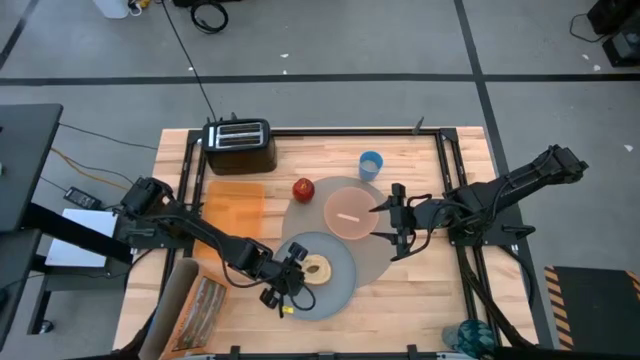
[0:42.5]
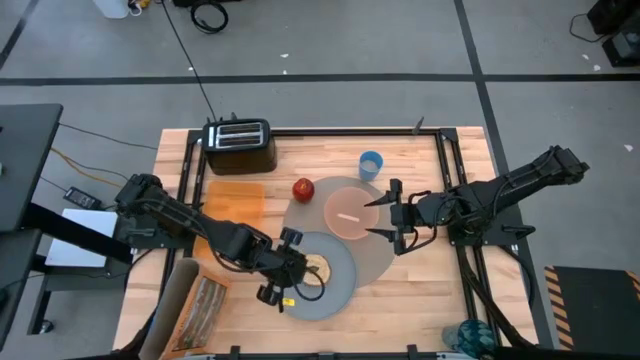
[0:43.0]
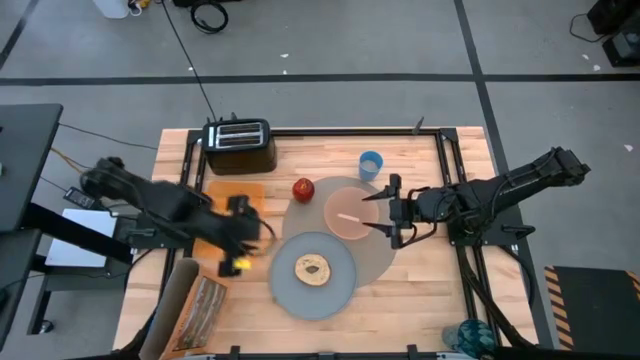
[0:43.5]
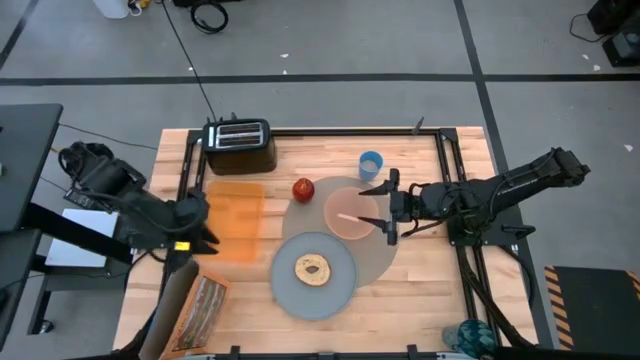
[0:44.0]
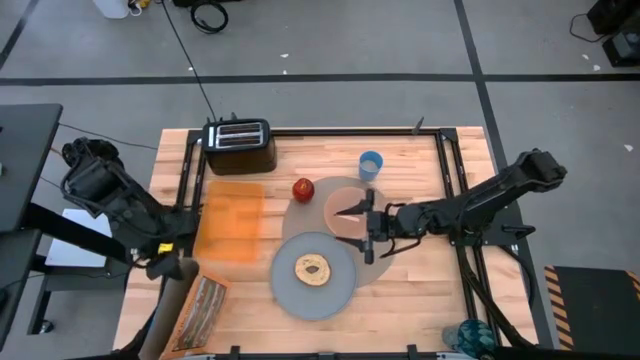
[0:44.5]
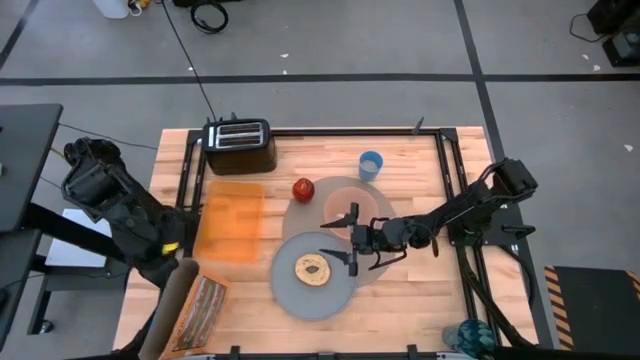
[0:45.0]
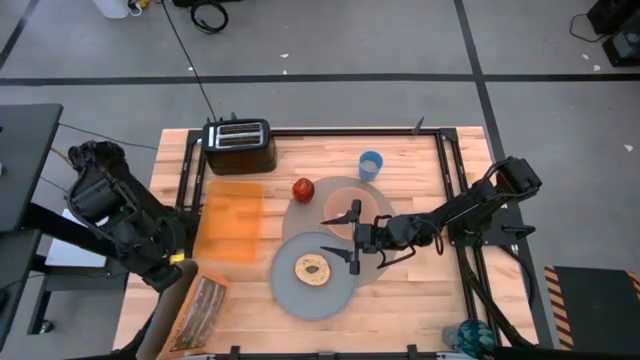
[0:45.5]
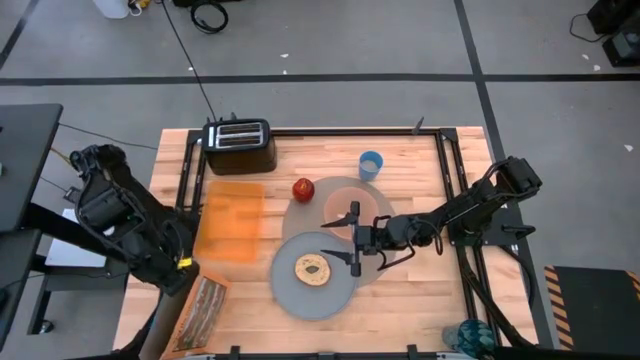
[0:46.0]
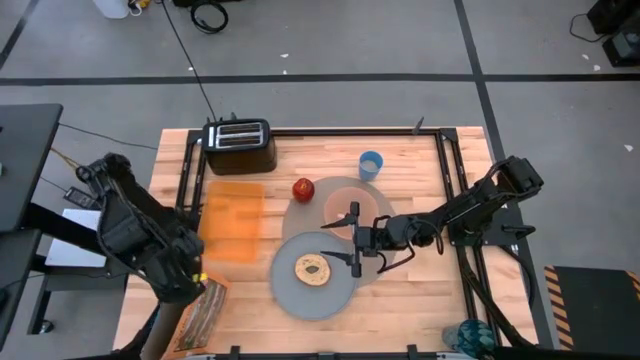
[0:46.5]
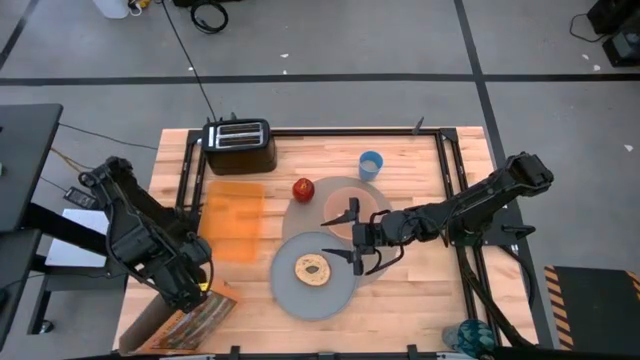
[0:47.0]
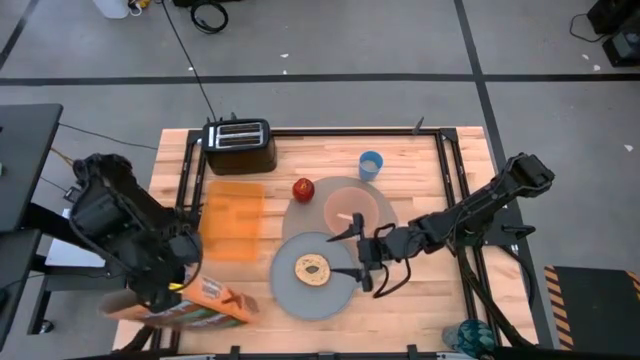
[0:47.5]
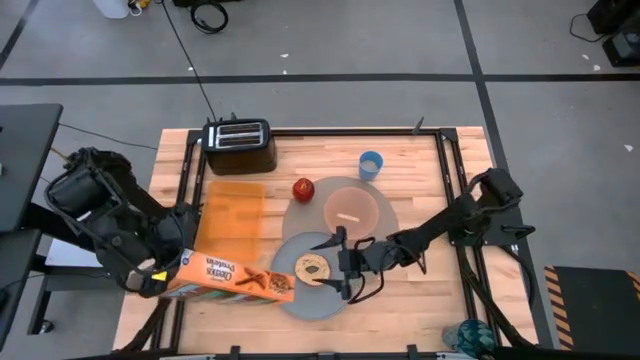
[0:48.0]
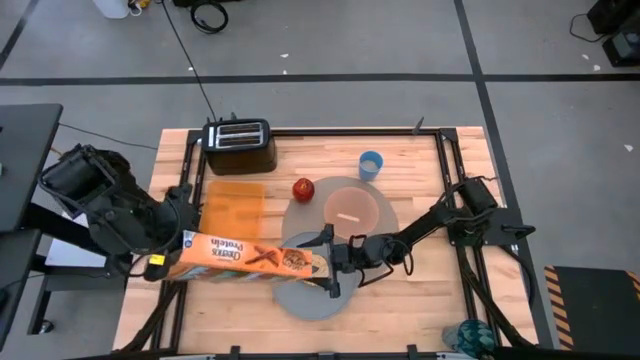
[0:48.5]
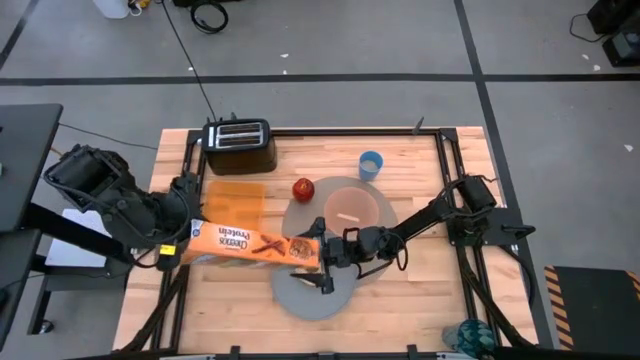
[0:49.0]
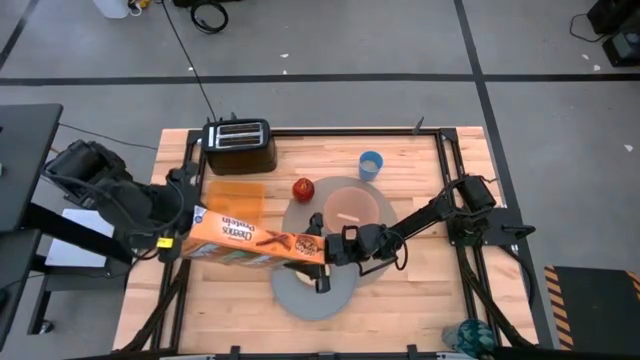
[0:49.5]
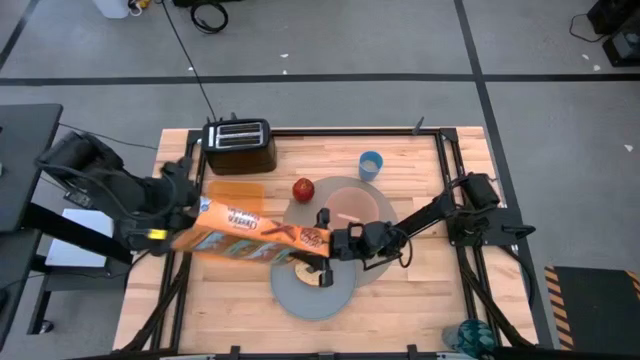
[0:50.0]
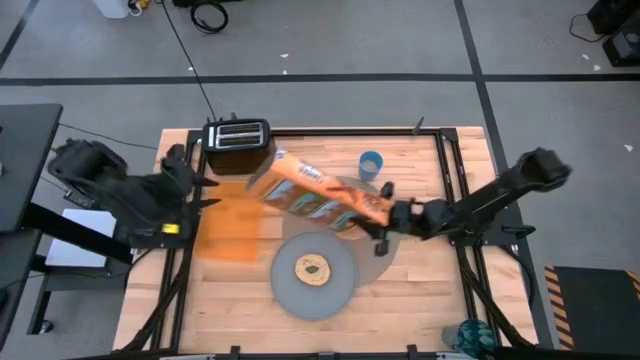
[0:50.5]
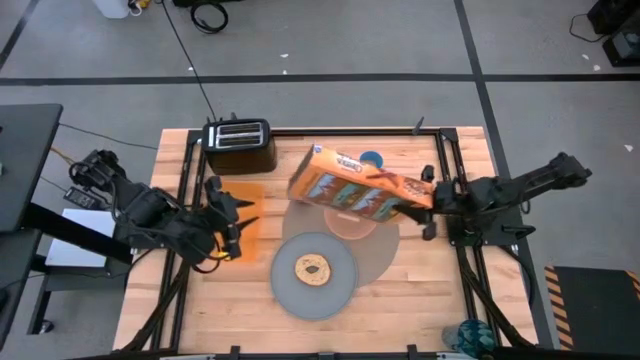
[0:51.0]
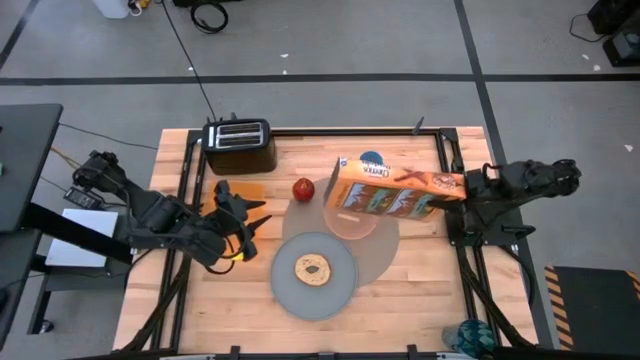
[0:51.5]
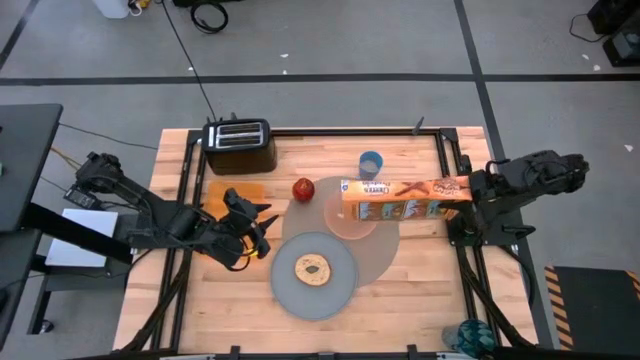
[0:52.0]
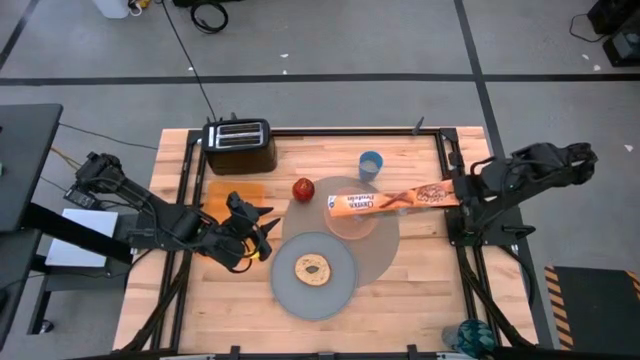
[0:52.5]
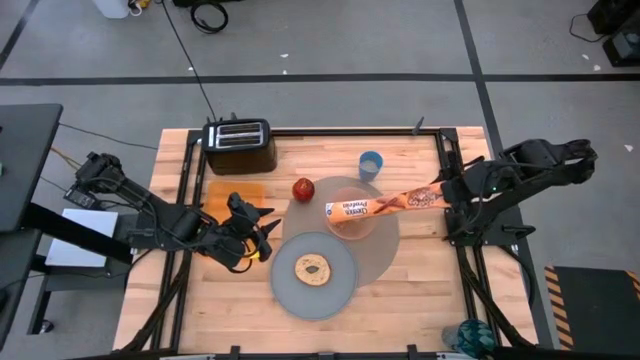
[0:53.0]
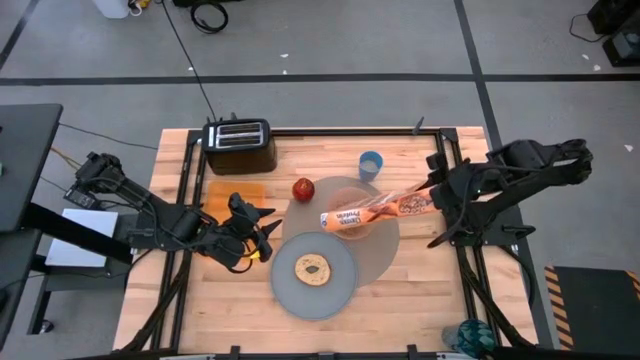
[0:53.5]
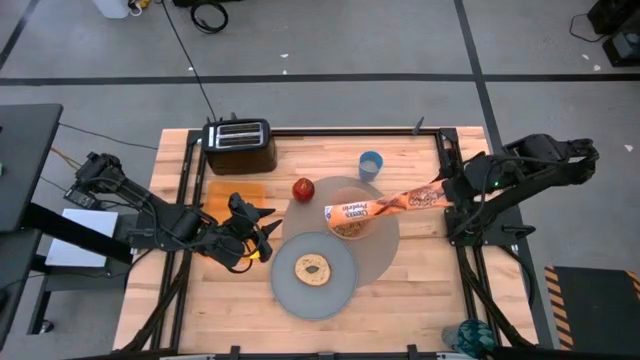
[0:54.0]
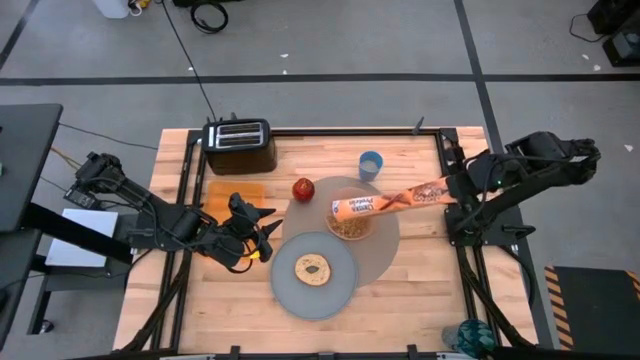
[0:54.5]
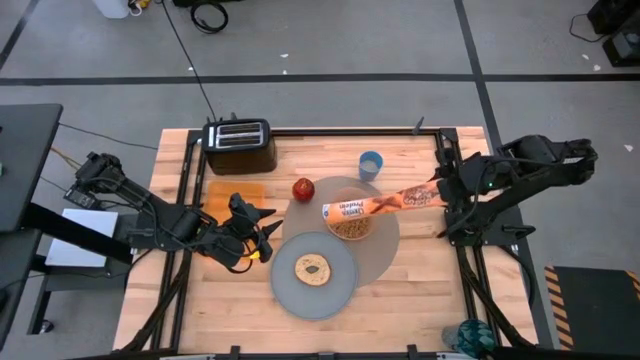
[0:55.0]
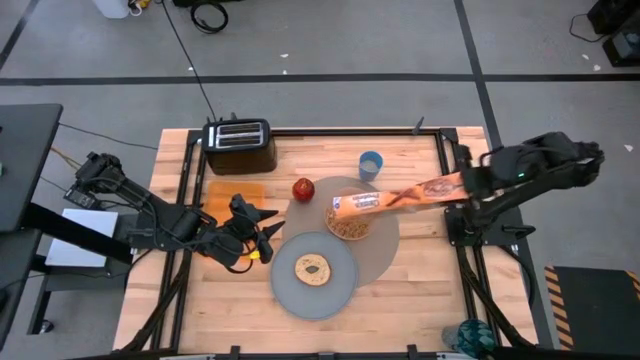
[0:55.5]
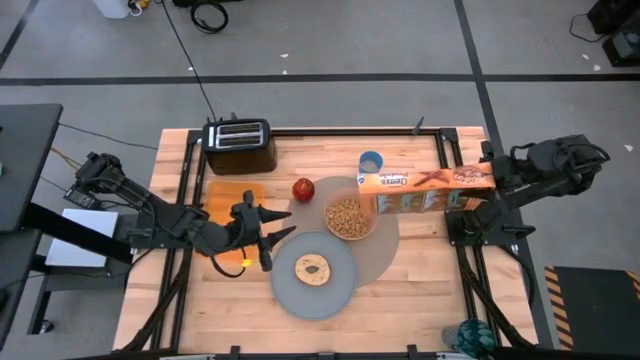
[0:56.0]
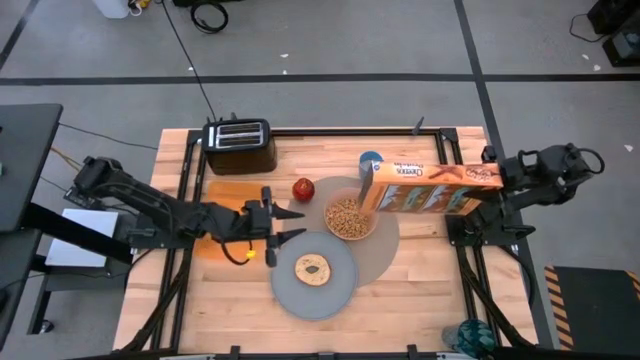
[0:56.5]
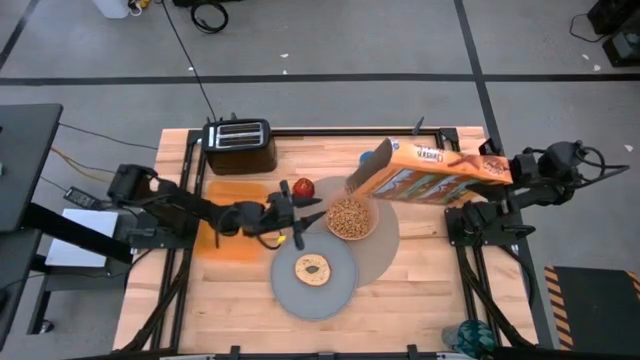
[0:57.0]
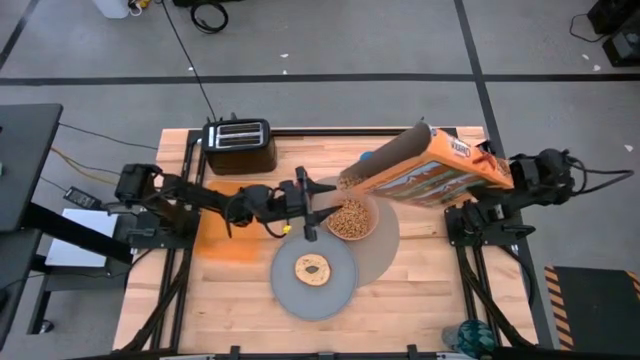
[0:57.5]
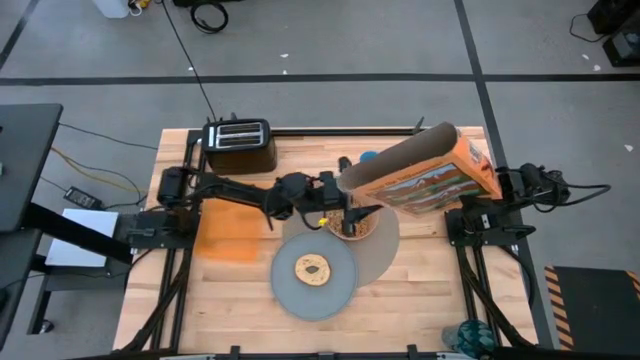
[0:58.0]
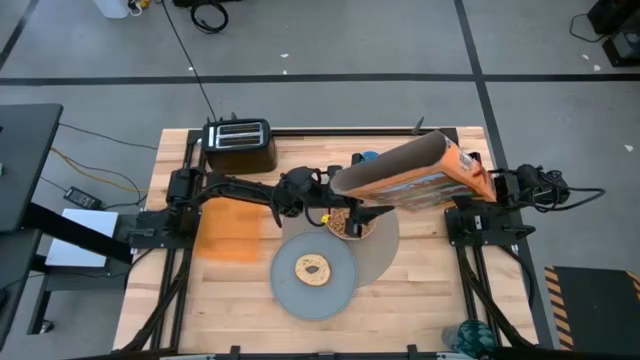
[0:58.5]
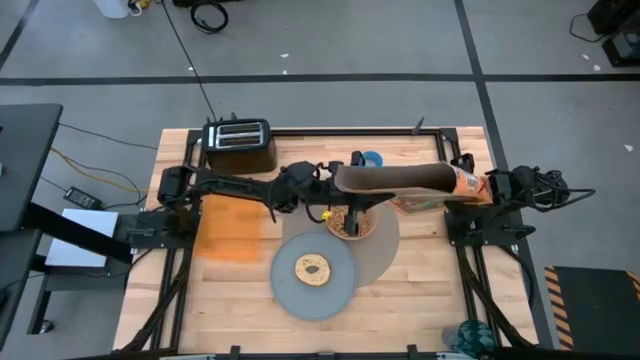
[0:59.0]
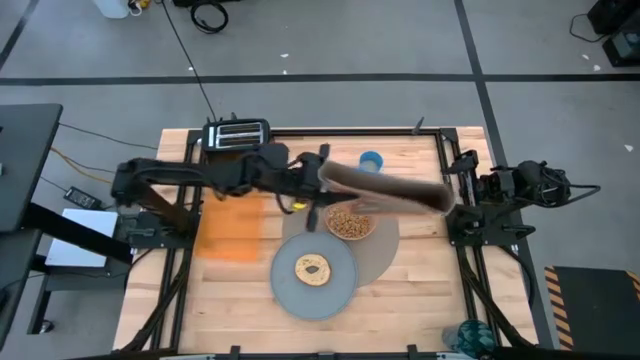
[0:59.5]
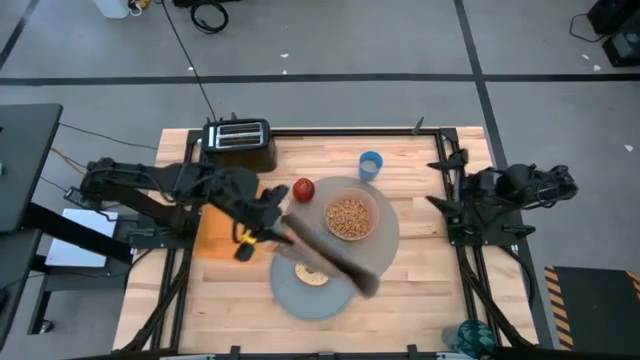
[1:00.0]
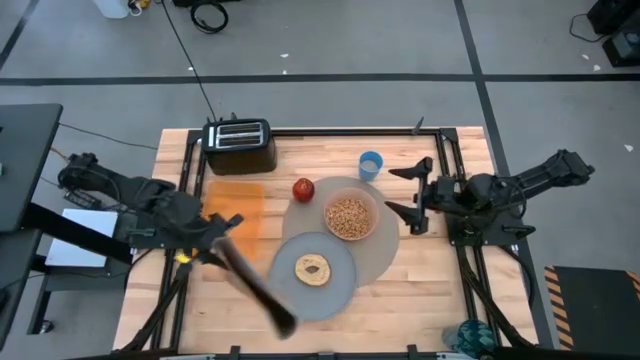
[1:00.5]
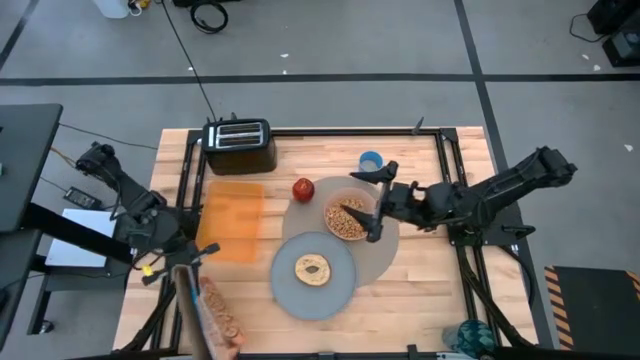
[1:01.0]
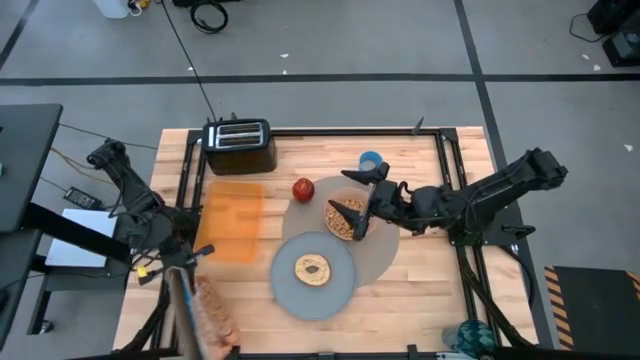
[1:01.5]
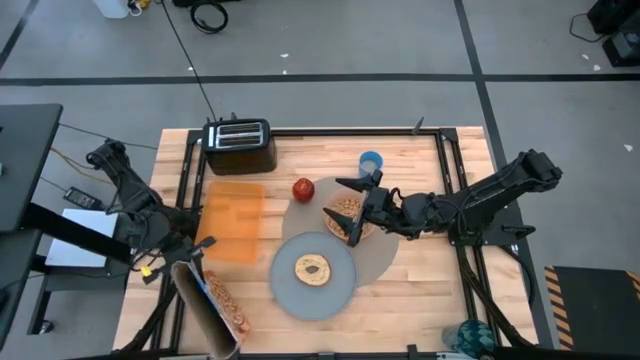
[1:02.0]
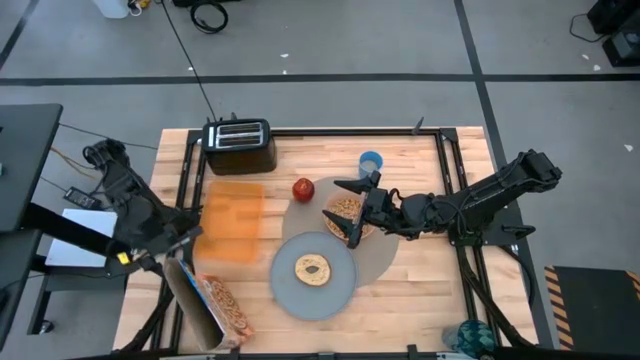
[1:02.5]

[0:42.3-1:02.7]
Task: Arrange a breakfast setting
Pour the cereal from the cereal box into the pink bowl
